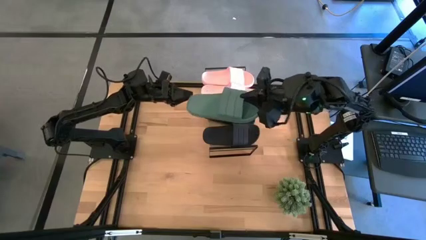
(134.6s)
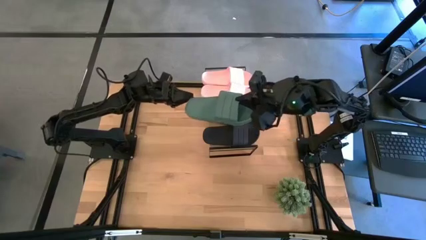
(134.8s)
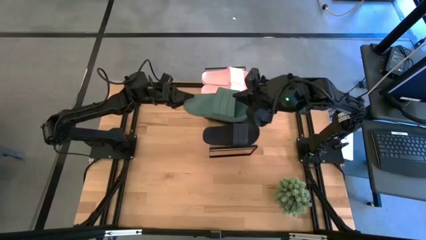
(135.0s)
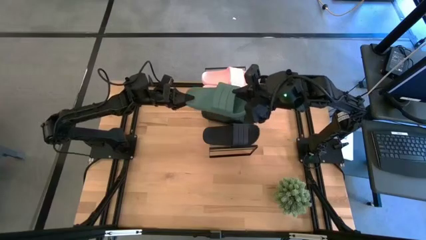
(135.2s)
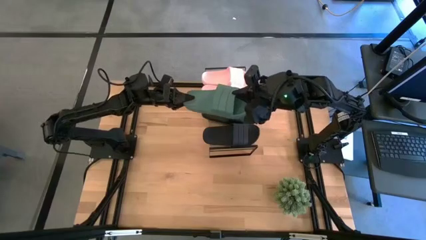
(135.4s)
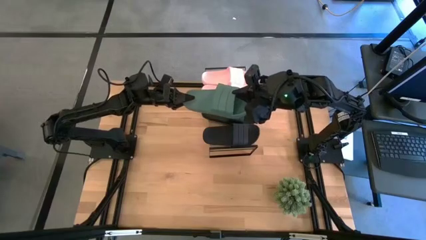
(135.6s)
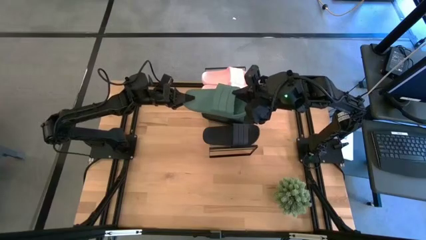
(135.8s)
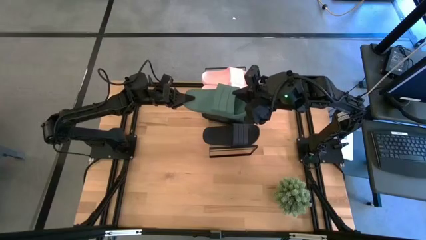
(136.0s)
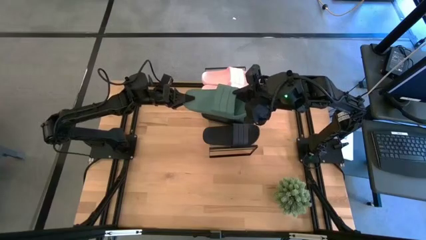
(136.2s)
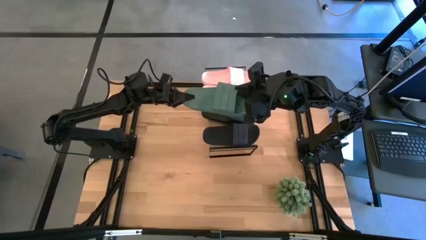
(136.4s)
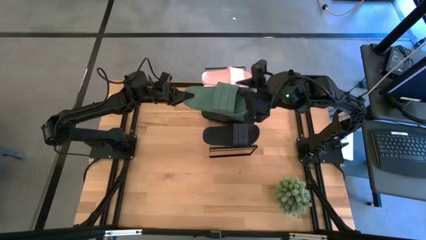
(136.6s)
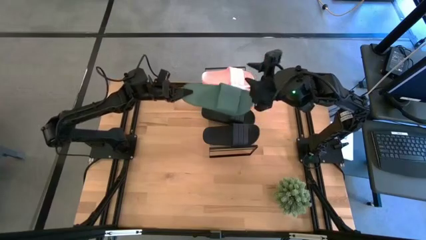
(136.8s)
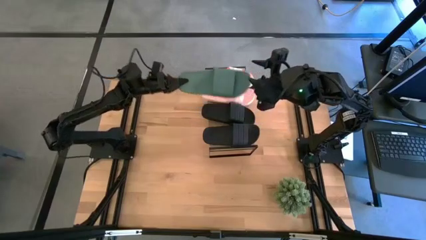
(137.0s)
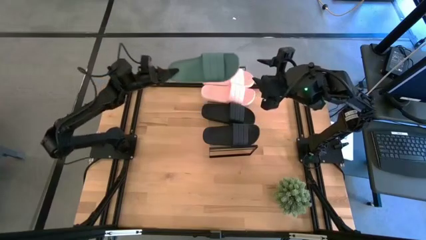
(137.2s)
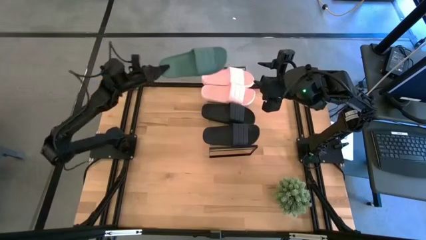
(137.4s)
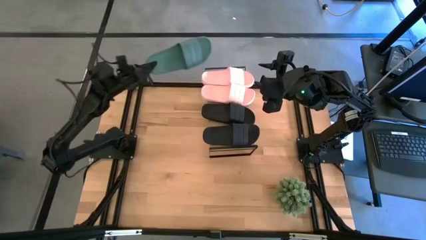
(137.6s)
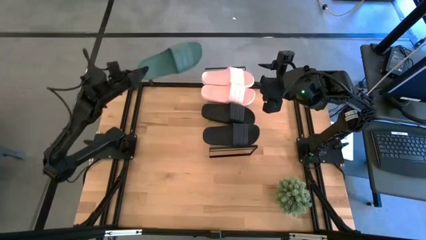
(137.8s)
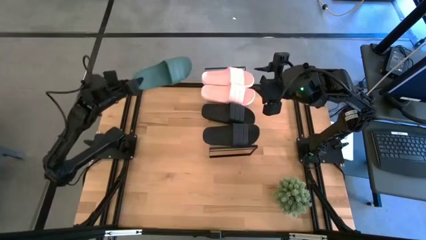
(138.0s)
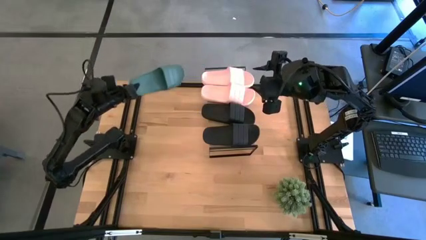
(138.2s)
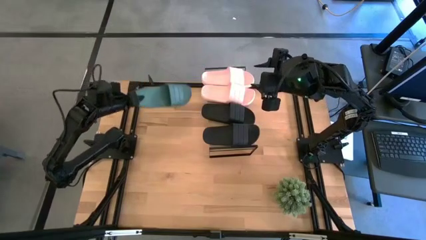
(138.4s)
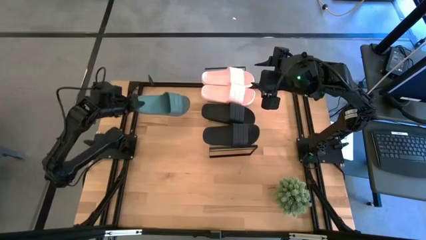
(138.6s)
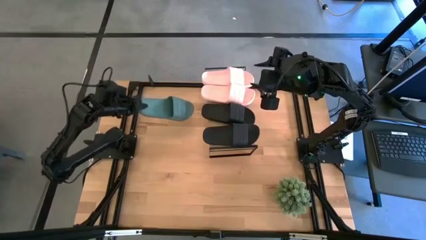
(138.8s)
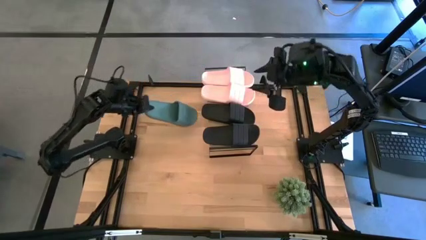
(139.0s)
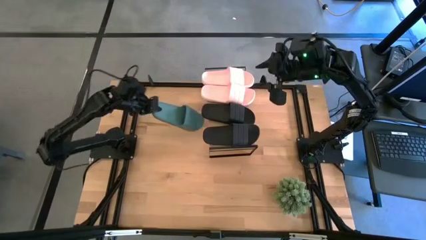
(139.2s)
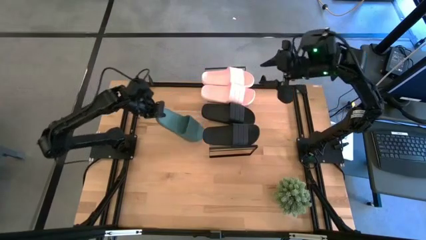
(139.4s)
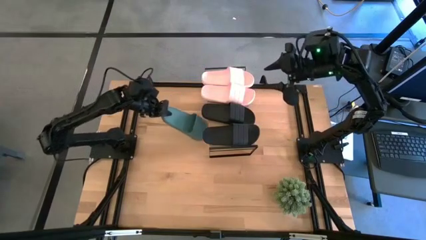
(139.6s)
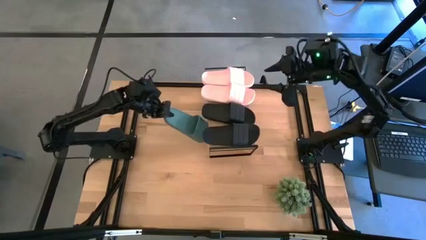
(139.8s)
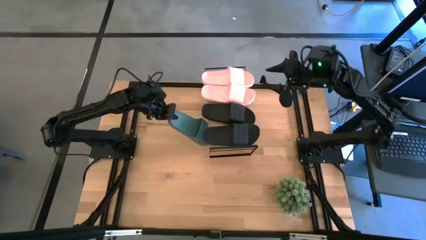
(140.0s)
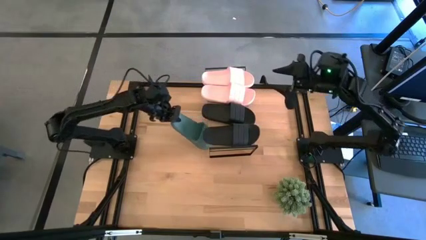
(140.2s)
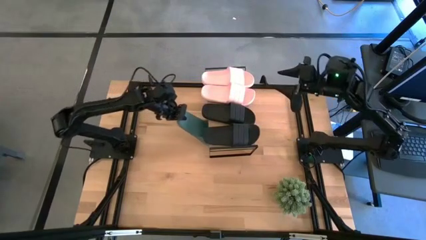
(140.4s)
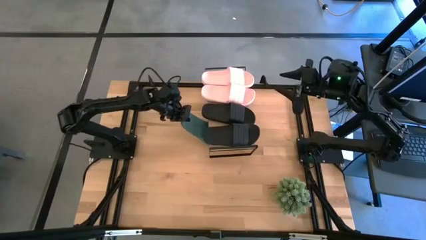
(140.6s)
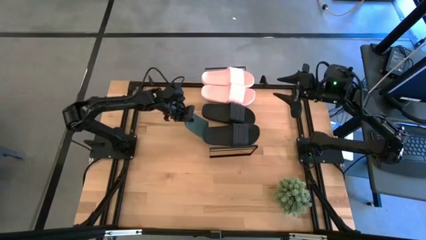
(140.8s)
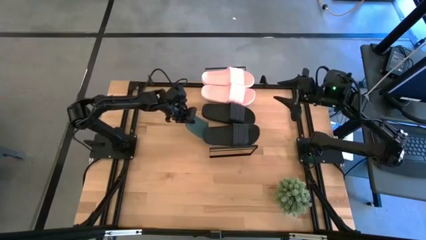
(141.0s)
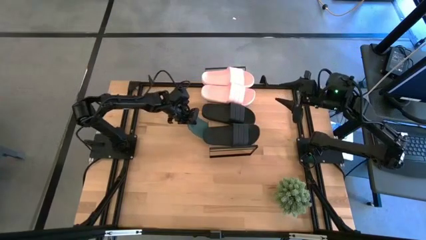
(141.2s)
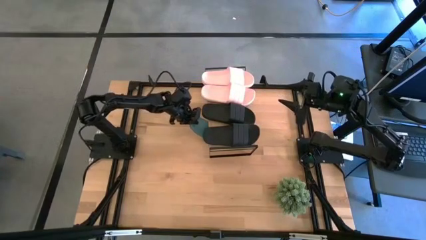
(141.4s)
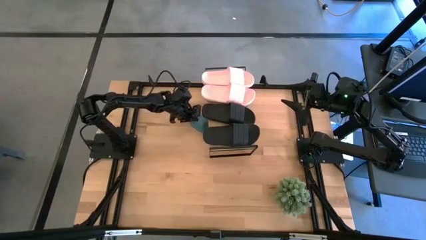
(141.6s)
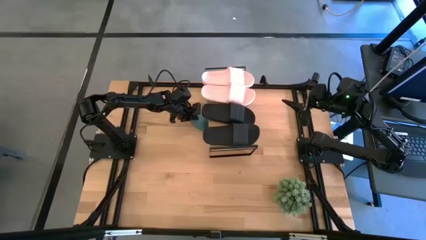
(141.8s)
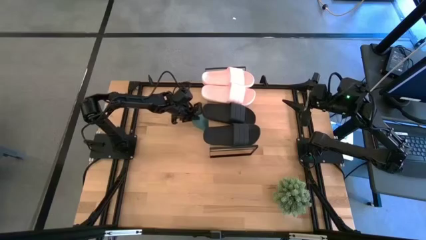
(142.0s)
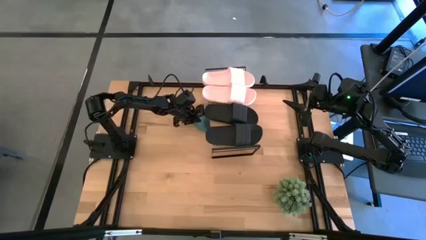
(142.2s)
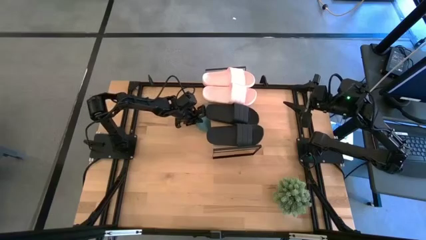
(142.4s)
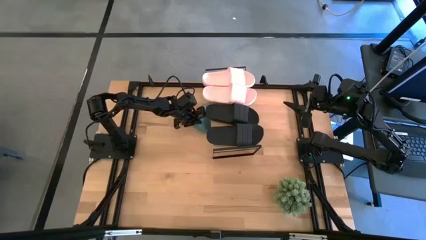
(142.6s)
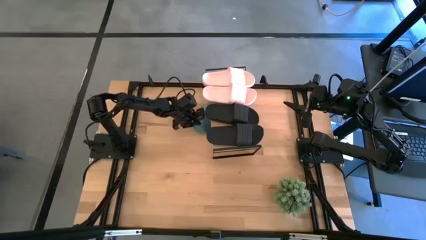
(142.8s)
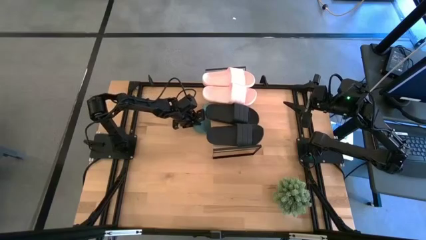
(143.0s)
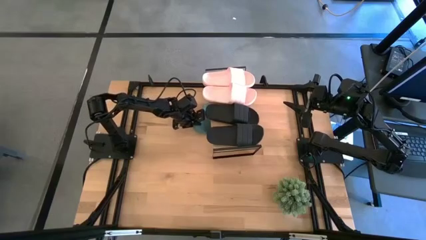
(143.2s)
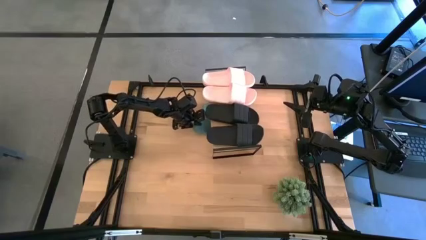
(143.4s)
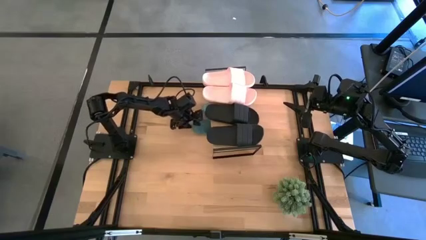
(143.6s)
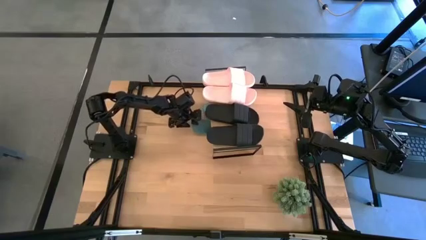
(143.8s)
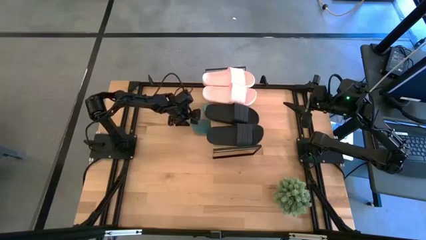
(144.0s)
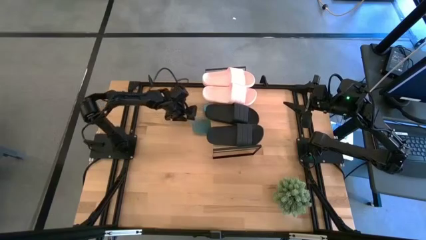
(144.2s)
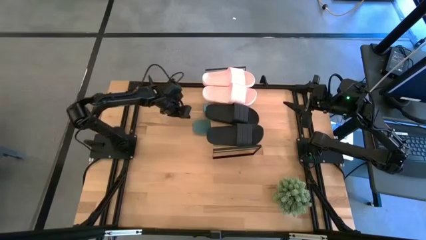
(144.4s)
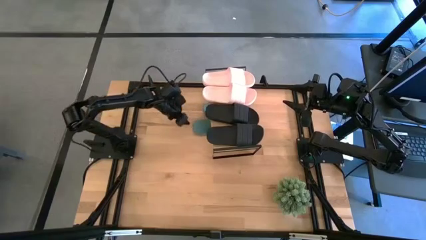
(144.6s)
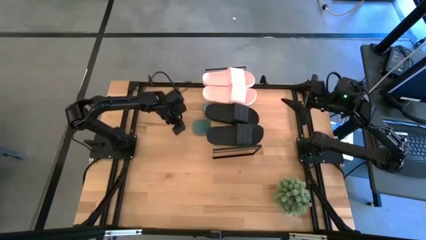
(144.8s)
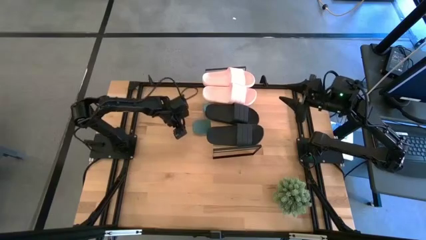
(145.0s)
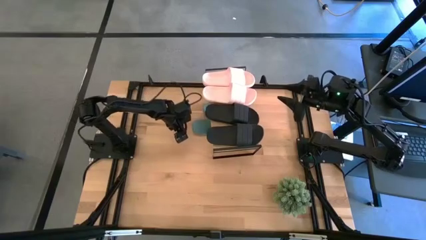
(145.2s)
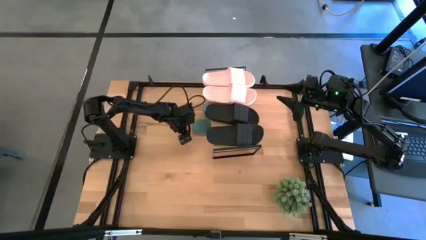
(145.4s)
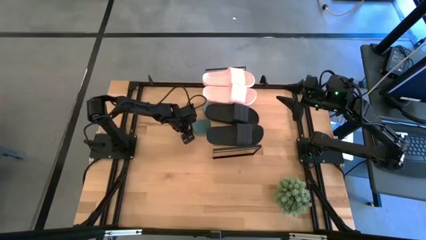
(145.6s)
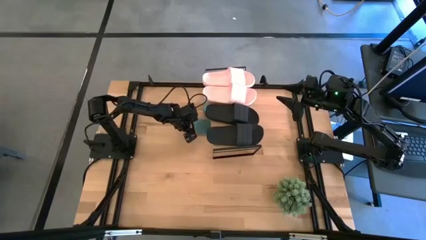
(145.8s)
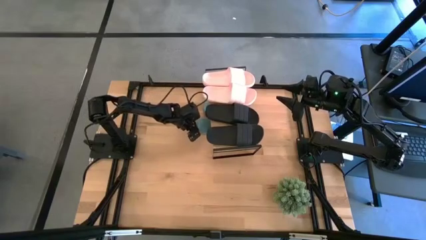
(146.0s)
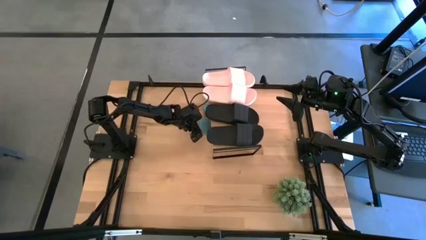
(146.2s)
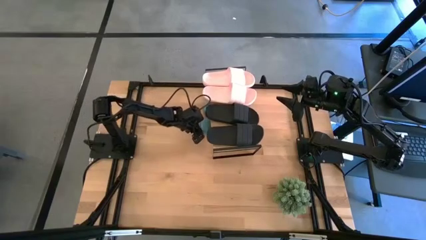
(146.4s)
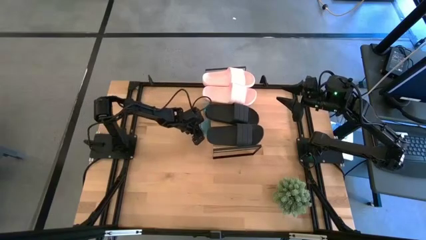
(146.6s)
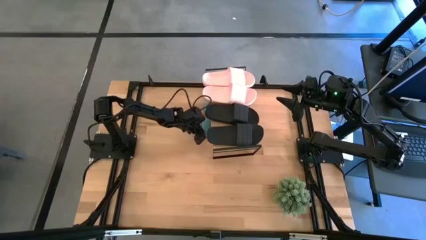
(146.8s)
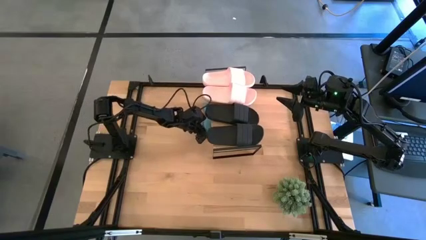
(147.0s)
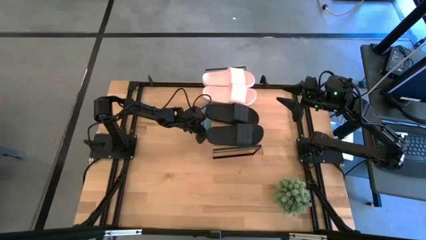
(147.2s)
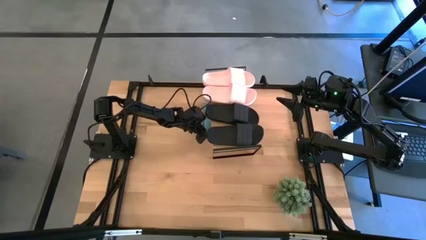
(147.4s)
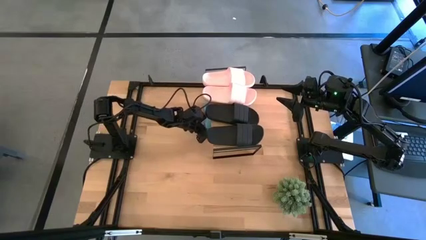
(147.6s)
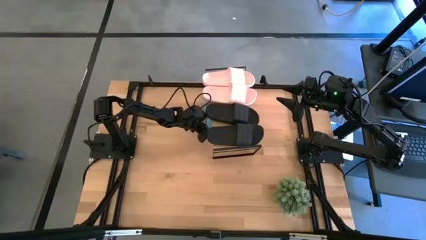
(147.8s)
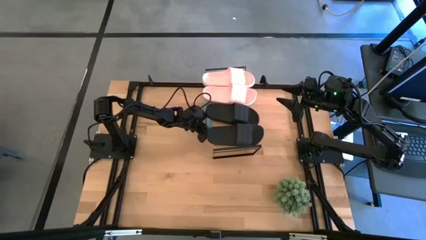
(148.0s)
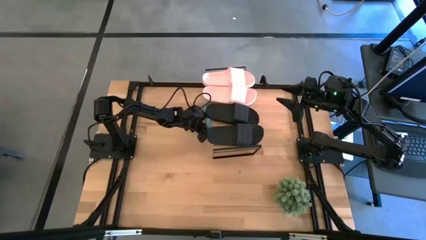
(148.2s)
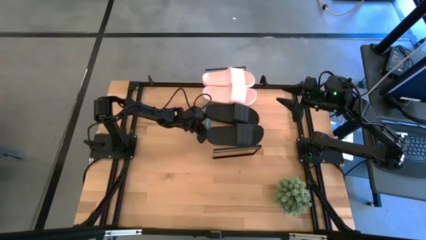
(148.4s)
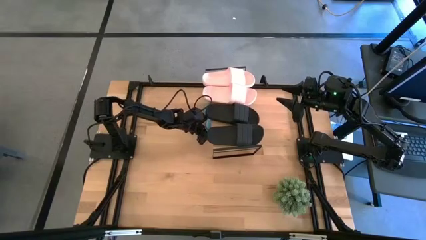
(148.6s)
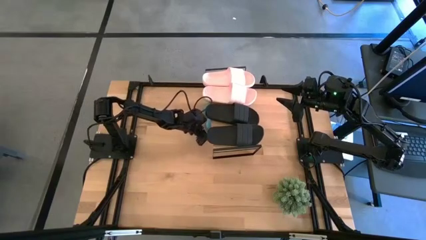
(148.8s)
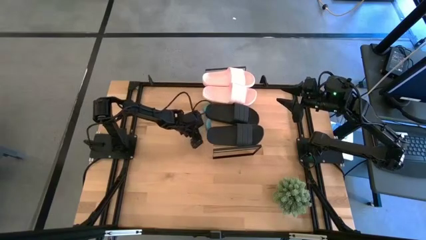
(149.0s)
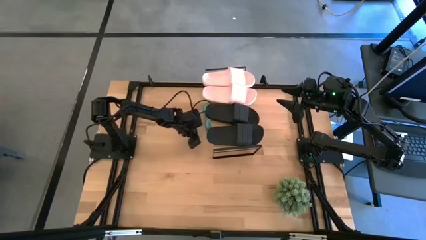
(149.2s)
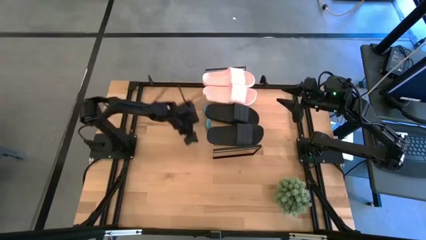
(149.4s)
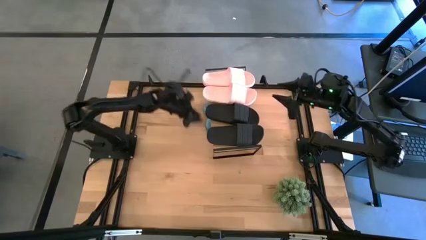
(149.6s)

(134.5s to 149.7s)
Task: Pick and place slides into the shelf
Put the green slide under the shelf
